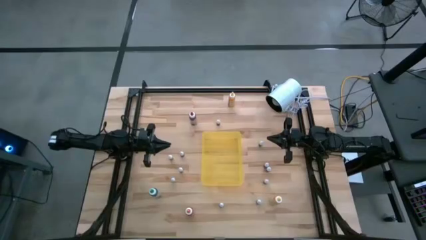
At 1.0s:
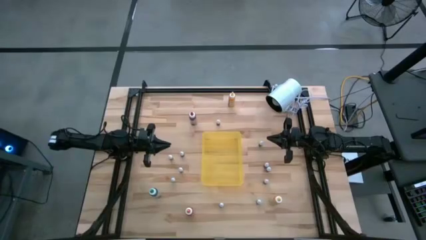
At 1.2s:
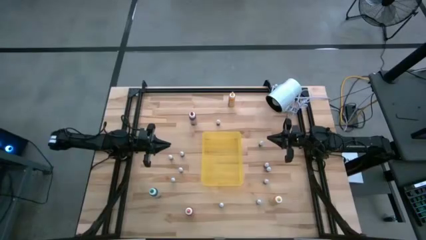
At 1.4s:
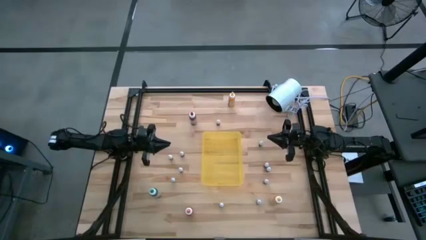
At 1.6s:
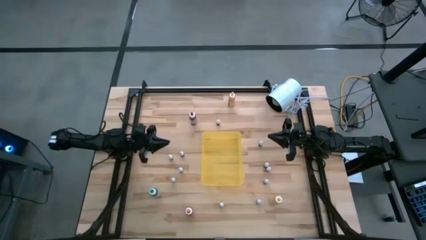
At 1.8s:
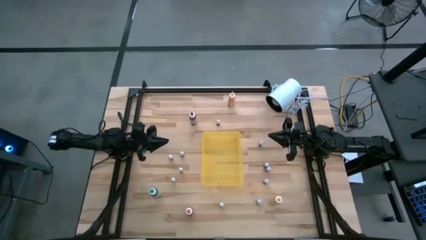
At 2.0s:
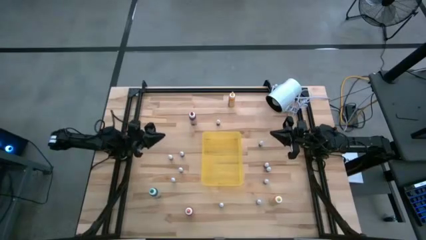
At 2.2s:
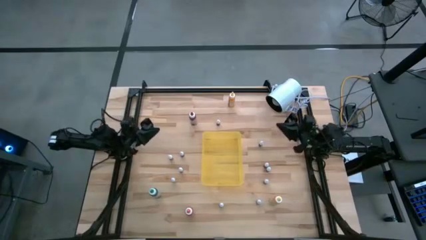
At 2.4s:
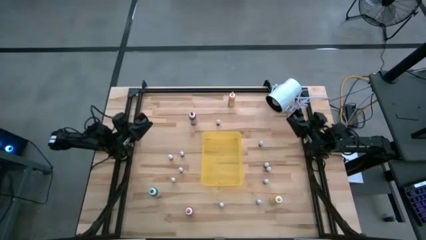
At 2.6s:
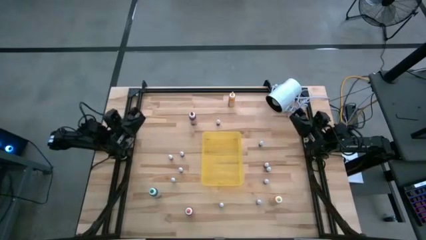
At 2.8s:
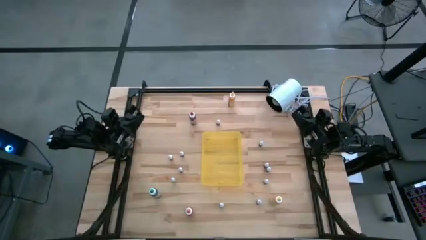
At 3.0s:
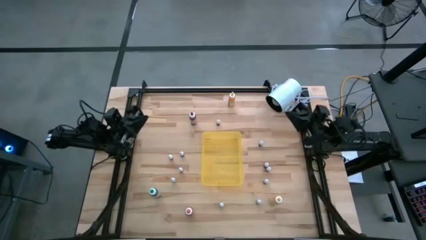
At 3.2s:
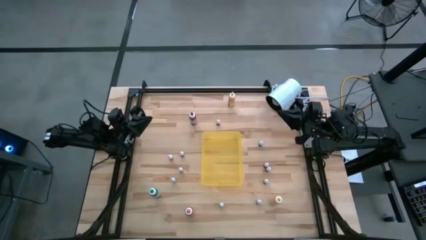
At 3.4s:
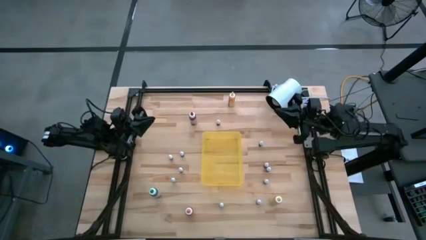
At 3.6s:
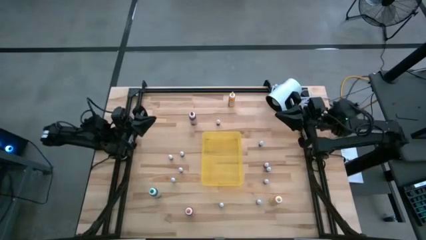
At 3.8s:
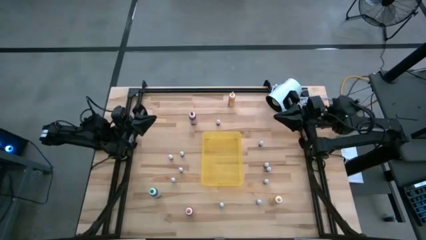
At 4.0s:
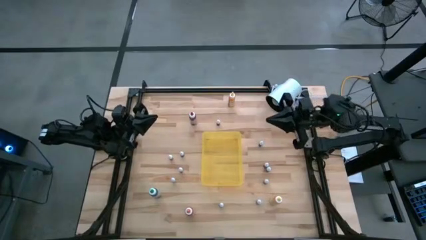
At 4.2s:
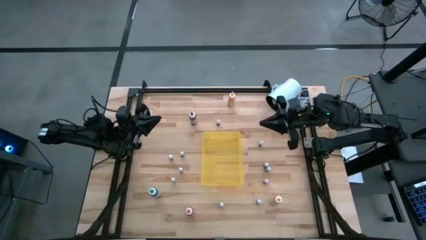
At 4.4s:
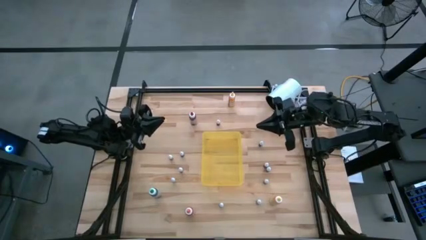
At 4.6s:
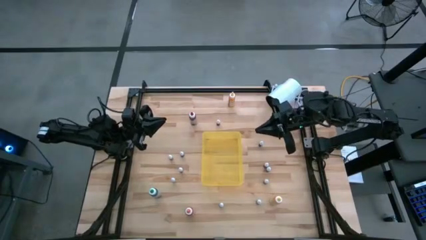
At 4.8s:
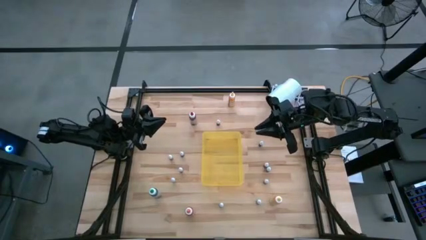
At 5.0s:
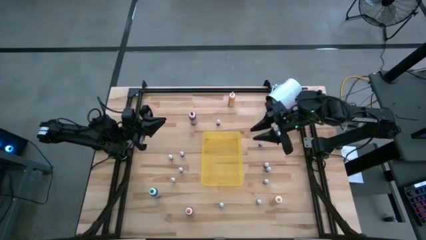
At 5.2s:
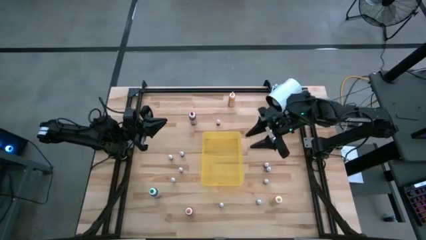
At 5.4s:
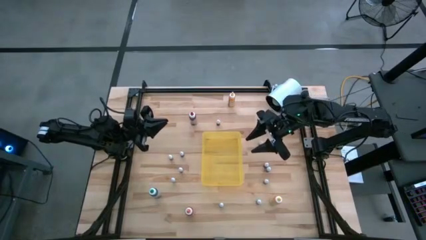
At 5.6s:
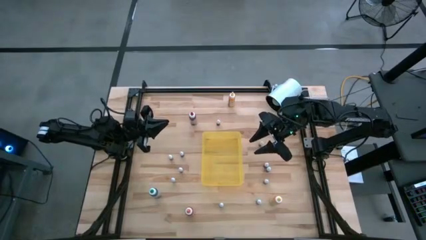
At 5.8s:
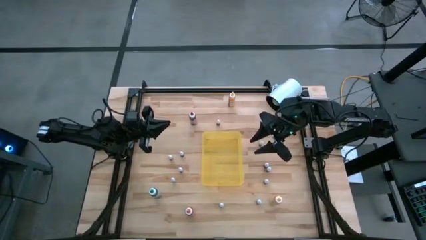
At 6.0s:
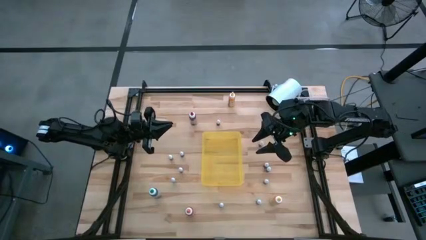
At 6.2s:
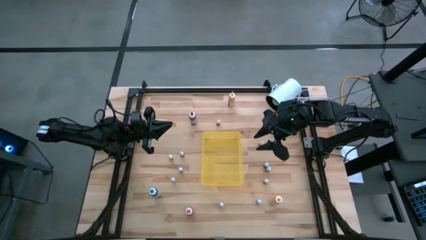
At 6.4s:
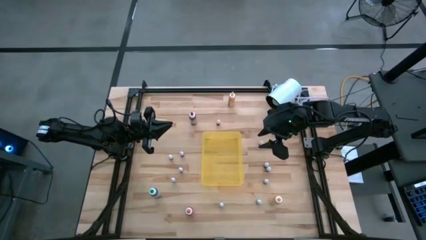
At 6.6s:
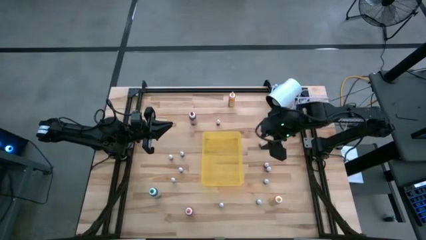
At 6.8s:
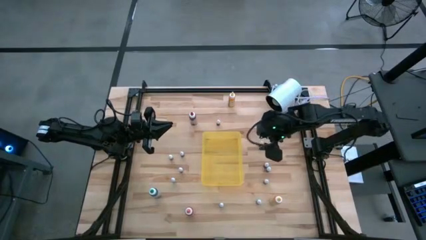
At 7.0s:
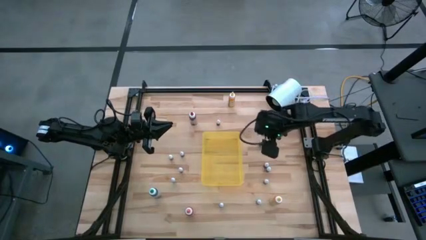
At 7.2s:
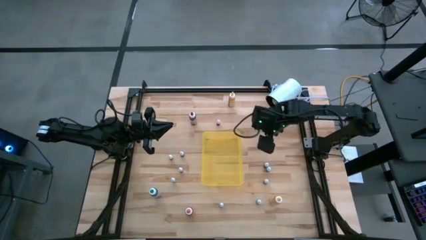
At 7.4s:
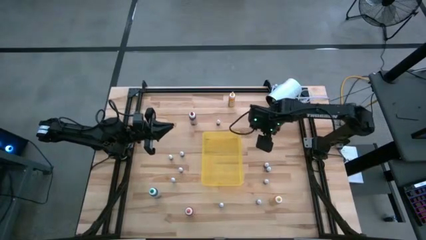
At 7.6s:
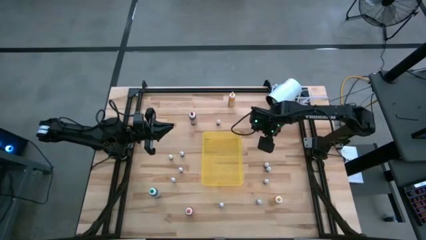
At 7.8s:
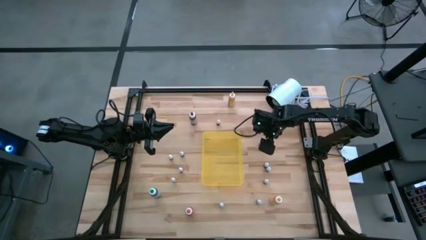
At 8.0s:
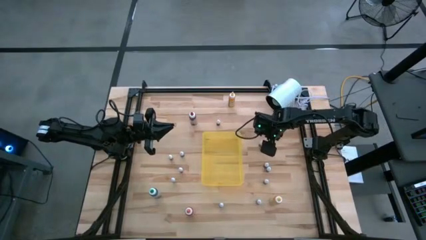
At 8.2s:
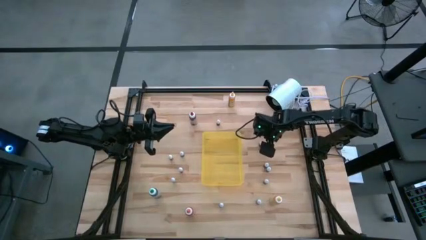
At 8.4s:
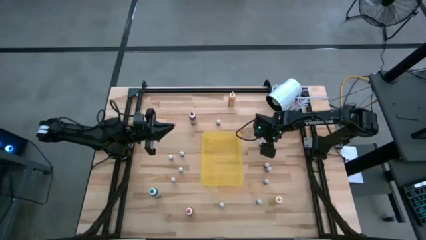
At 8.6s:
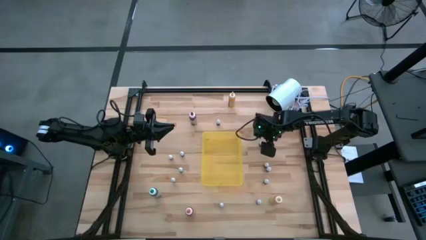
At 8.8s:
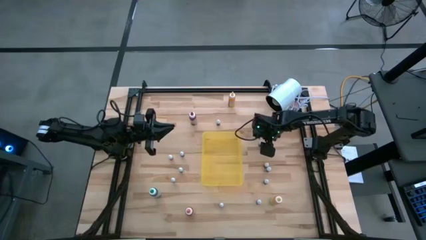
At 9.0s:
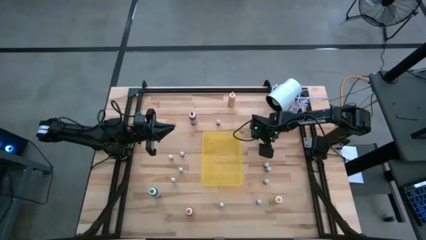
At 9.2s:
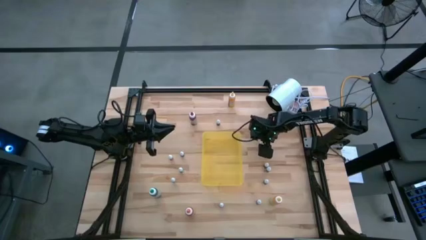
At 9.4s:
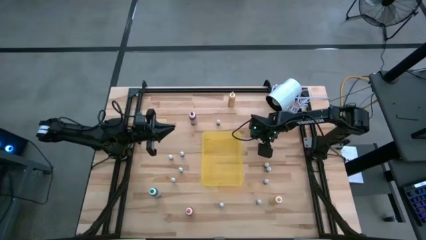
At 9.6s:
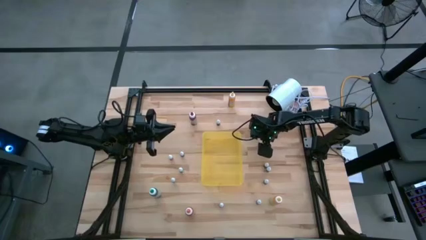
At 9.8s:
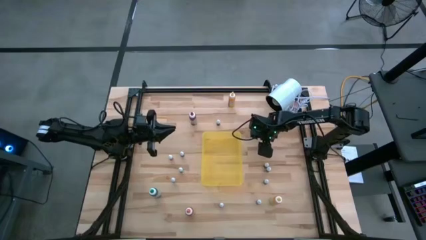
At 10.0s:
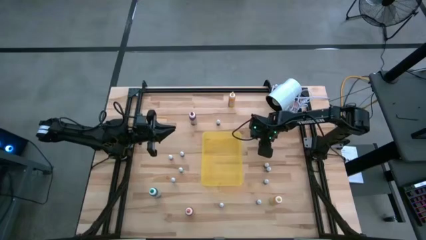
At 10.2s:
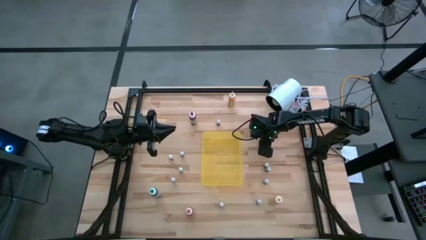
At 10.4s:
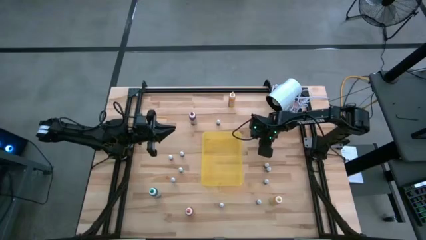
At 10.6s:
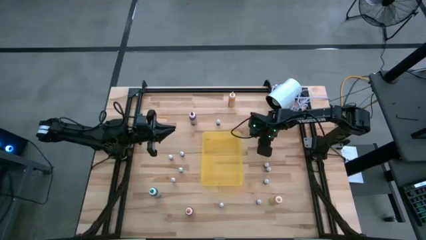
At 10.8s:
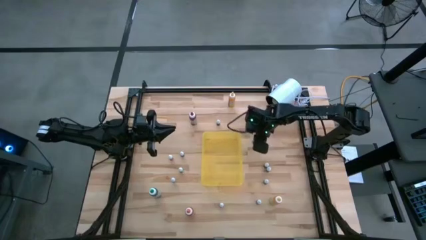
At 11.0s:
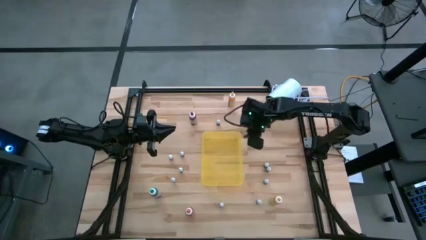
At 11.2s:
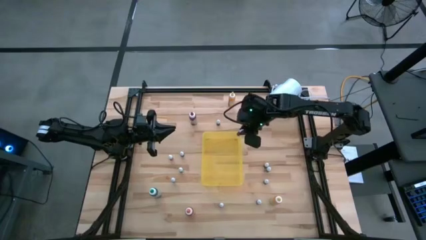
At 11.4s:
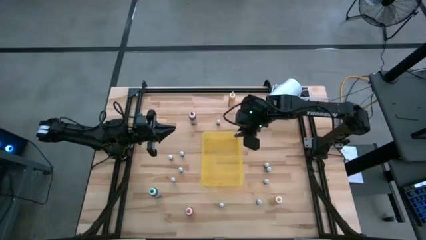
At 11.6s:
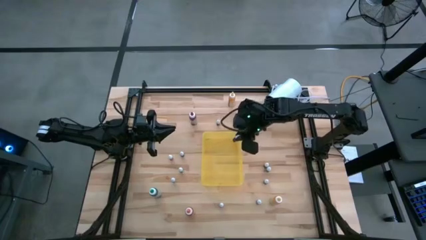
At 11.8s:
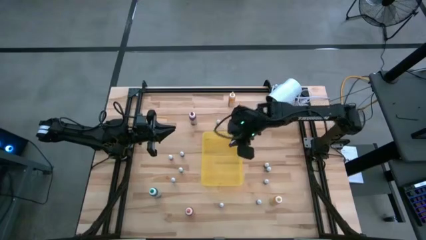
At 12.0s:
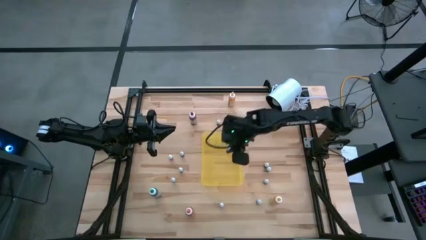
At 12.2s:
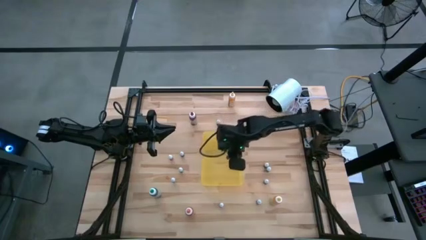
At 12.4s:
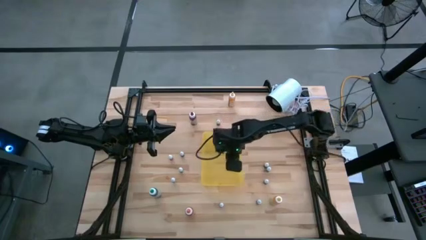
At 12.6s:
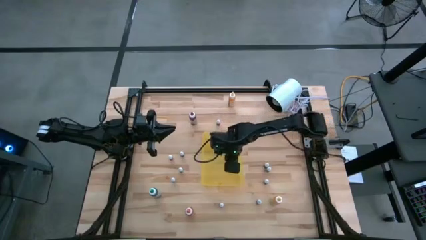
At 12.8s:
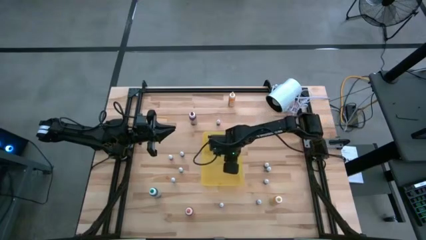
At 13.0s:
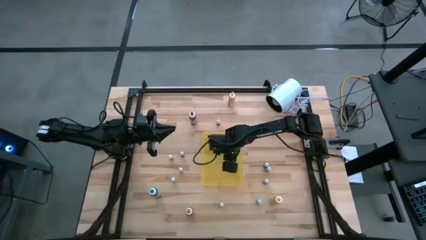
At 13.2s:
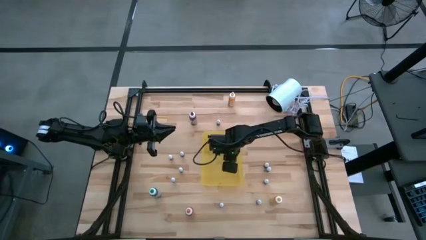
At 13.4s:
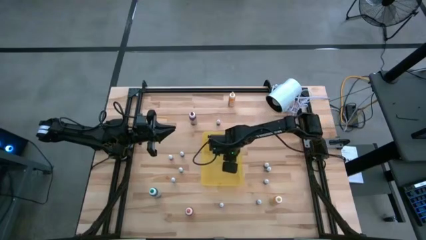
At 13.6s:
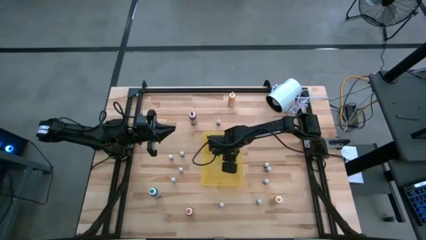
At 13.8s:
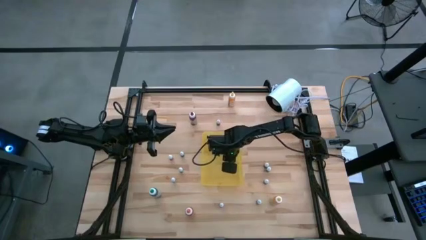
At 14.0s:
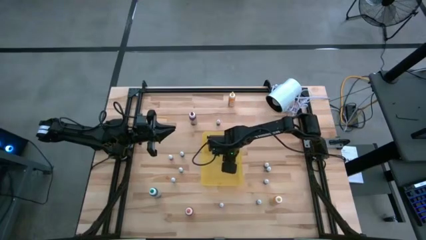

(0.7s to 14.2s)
Task: Pick & Place food coloring
Put the small violet food coloring bottle into the yellow bin
